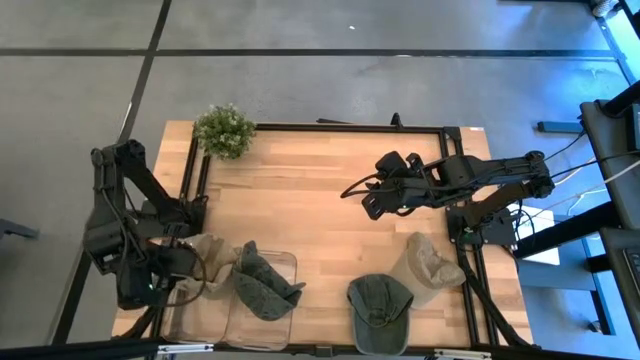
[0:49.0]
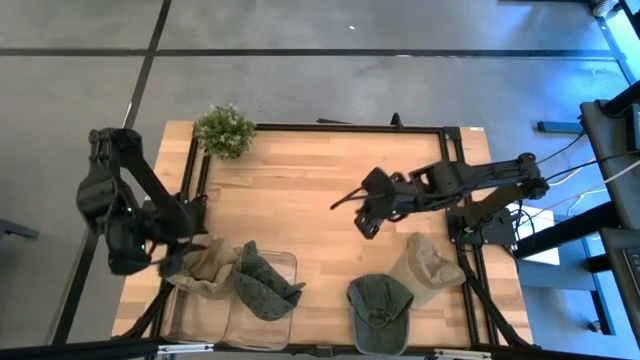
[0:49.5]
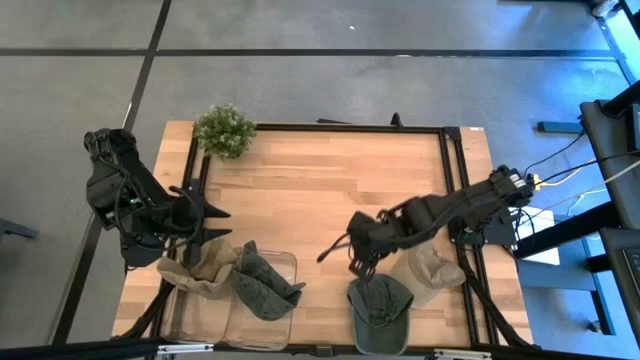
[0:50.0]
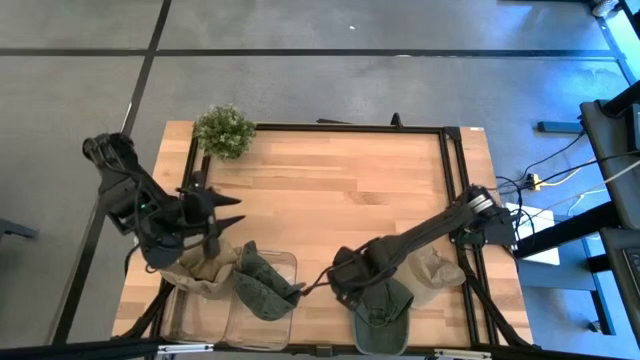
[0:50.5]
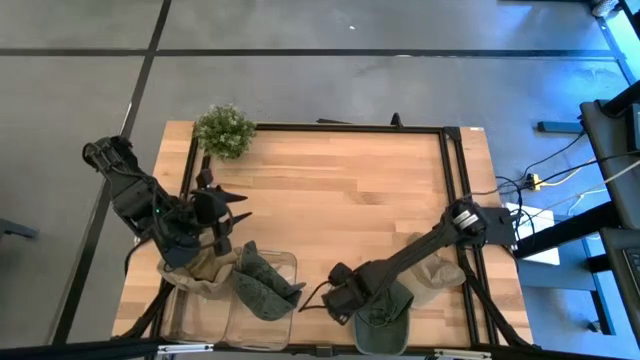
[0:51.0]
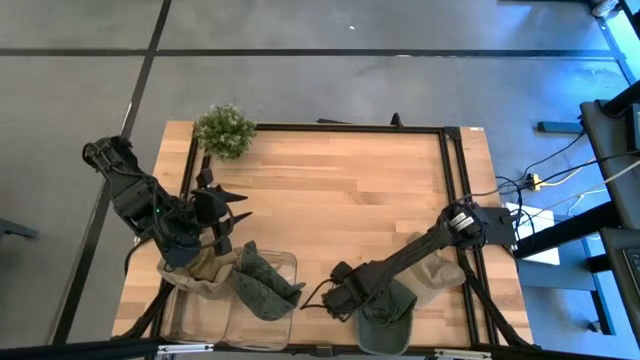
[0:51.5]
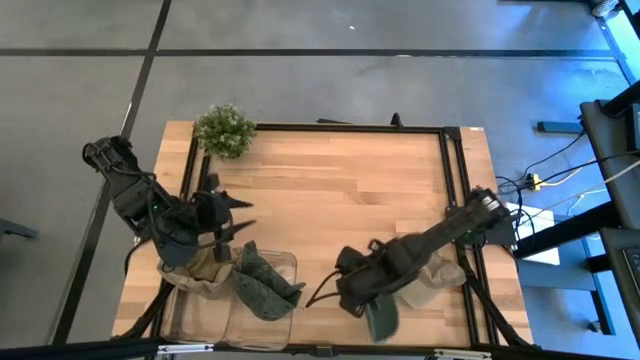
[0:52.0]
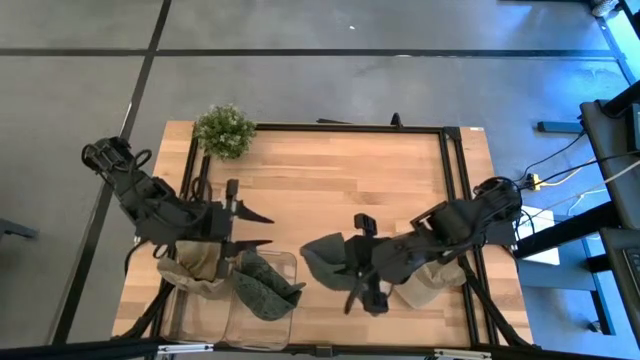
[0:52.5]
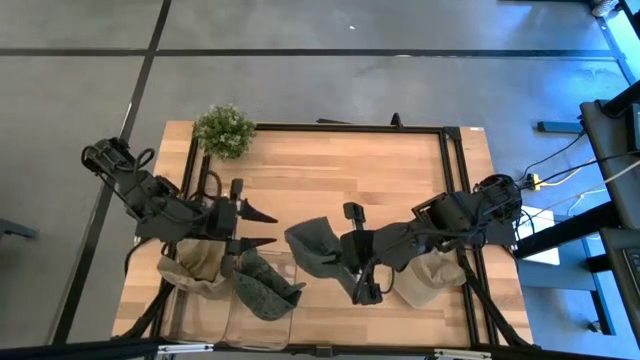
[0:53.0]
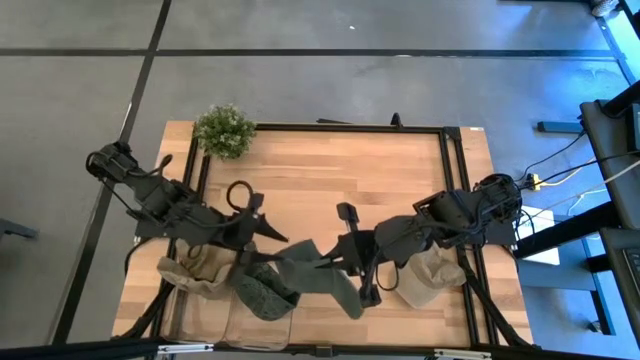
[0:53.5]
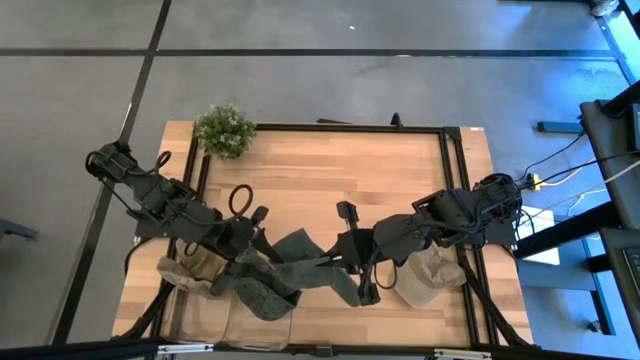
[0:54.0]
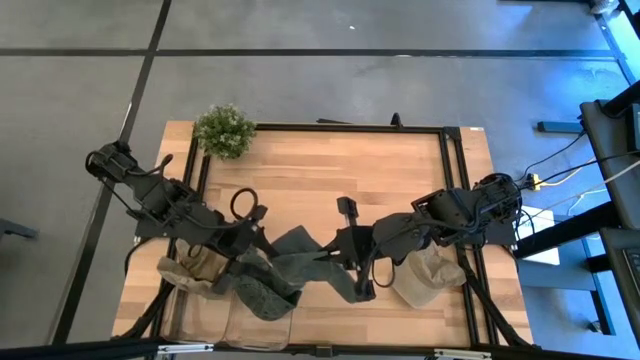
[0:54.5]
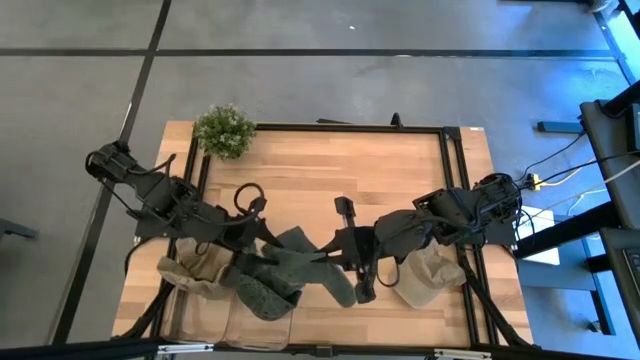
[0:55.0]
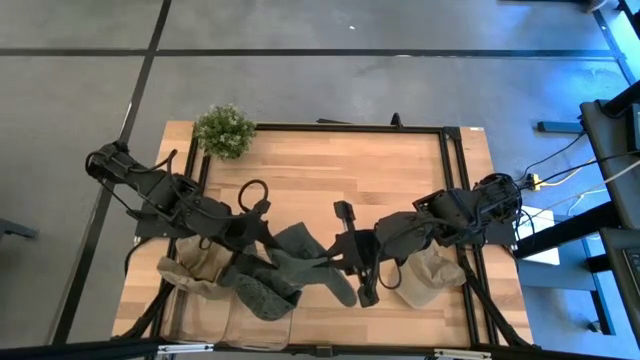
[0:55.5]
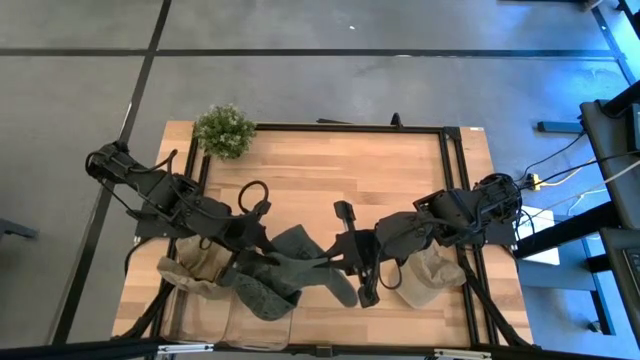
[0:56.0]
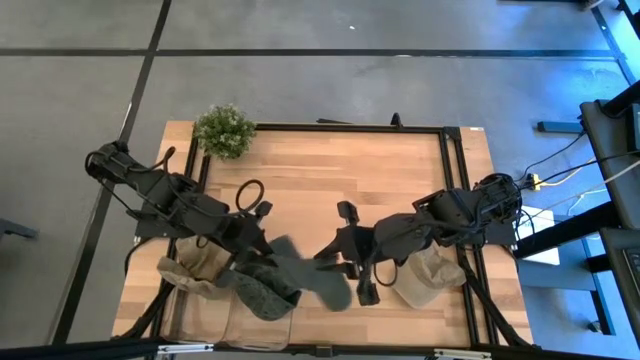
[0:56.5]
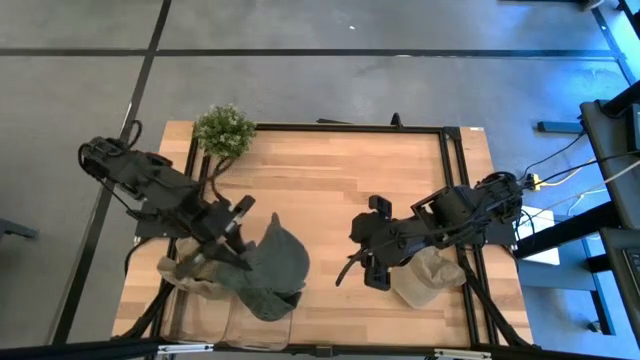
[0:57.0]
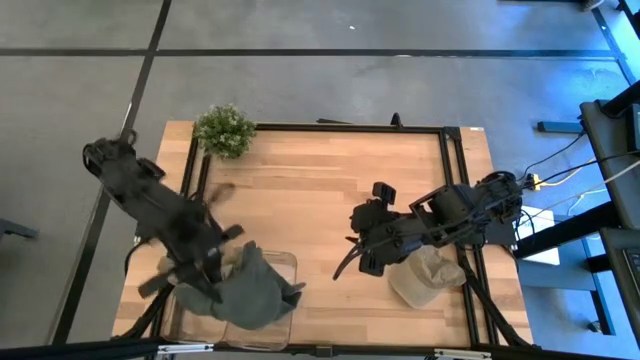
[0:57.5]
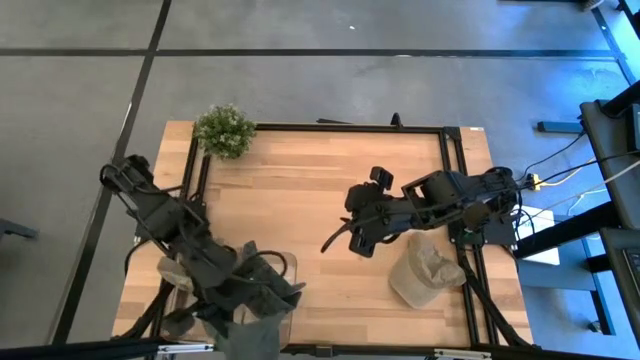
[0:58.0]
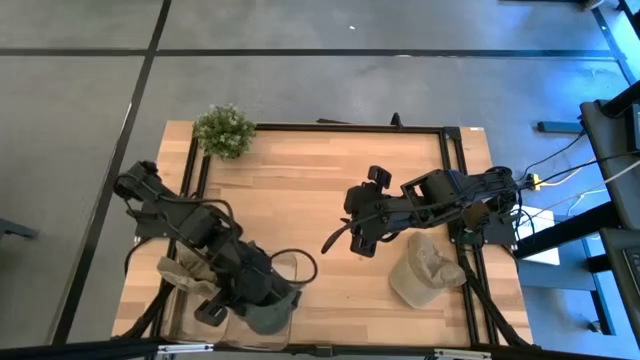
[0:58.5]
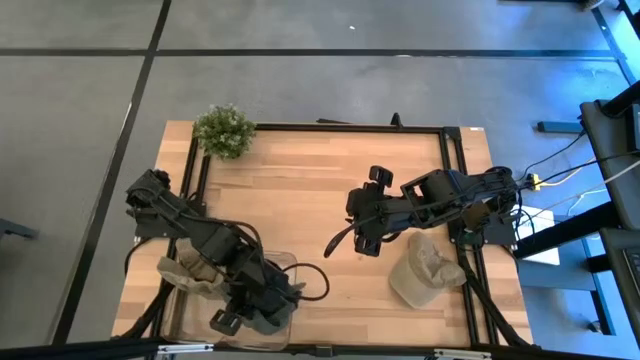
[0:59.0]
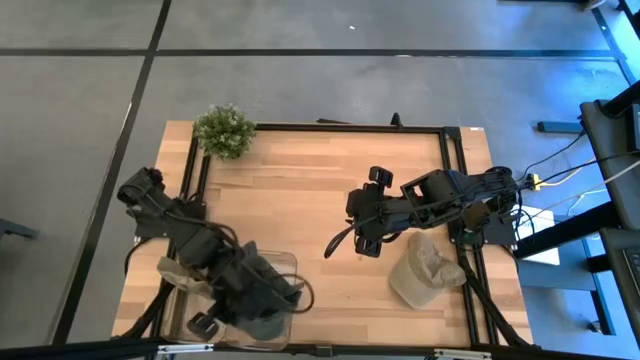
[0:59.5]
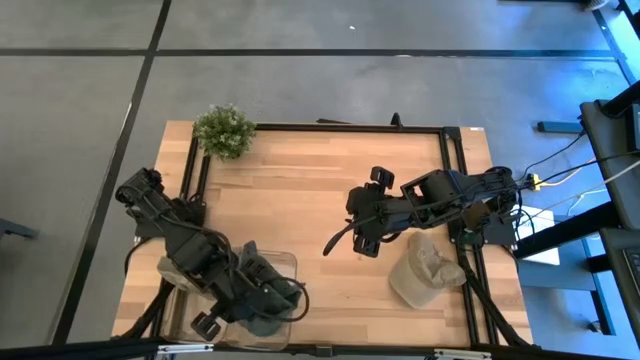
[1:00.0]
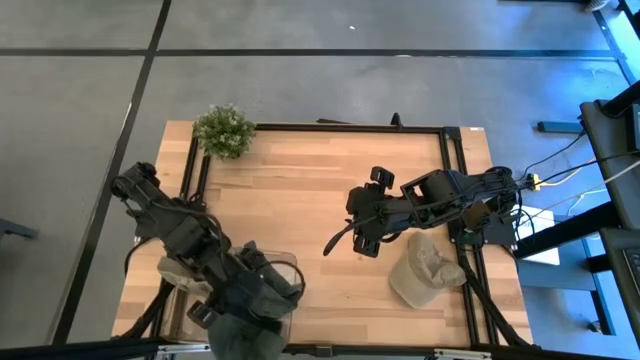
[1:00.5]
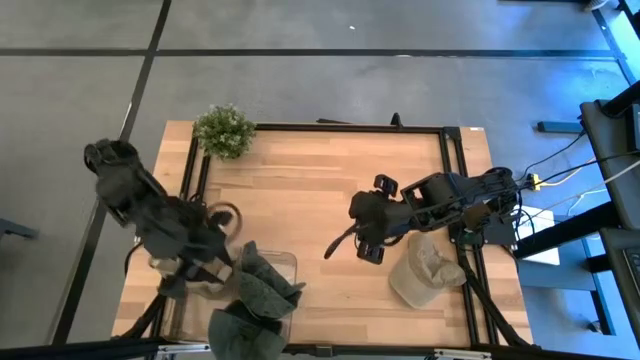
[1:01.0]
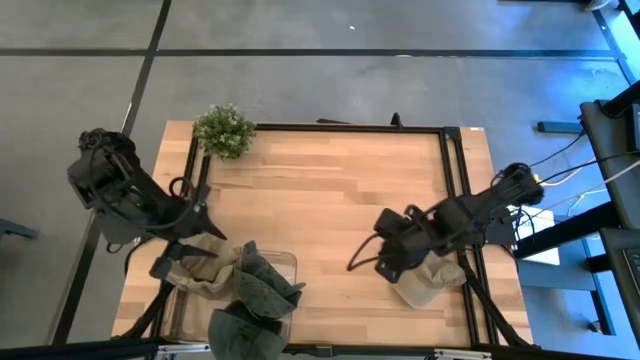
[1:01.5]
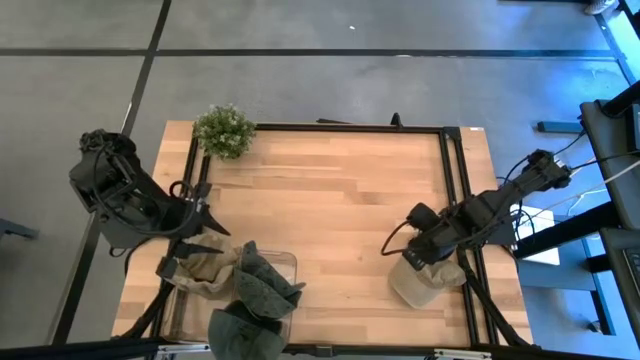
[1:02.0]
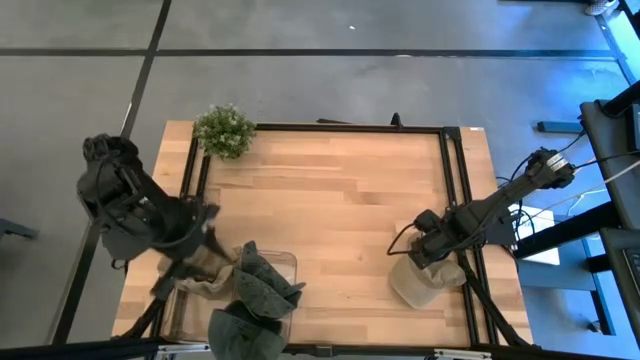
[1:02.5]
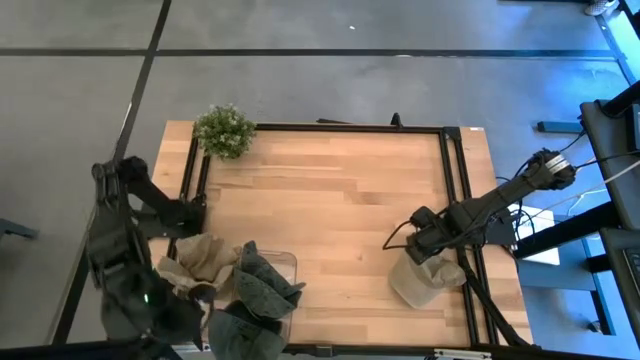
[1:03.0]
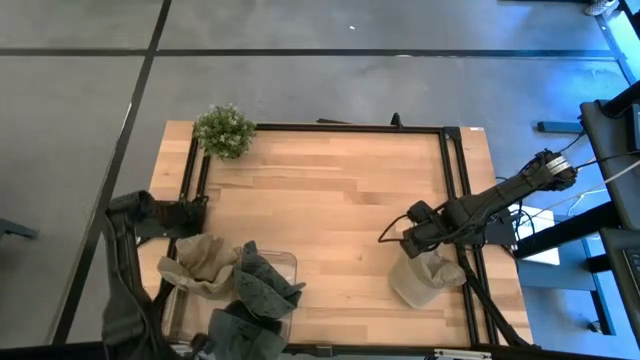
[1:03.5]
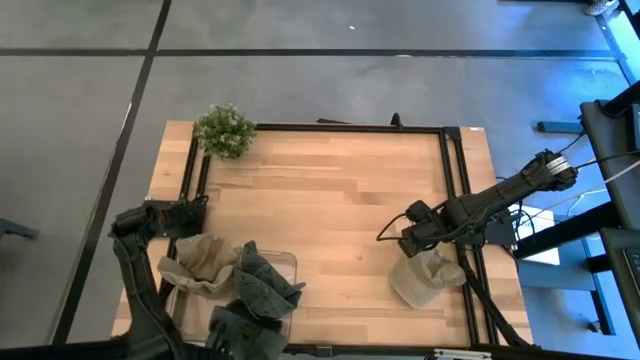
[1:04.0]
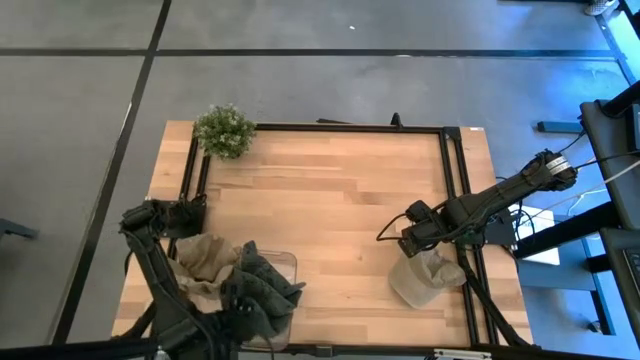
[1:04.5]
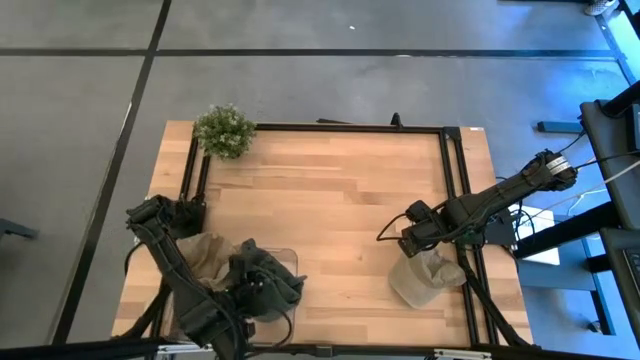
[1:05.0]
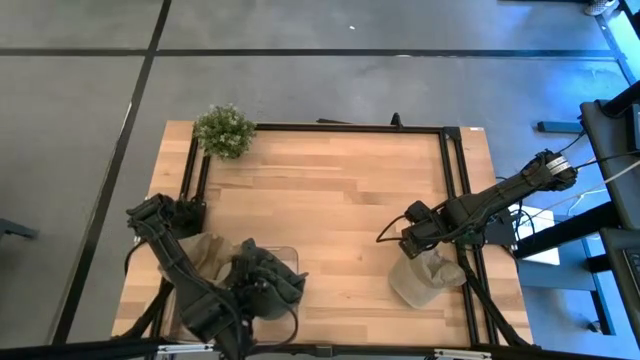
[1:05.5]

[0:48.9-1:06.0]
Task: Pick & Place hat
Put the black cap into the right transparent bin

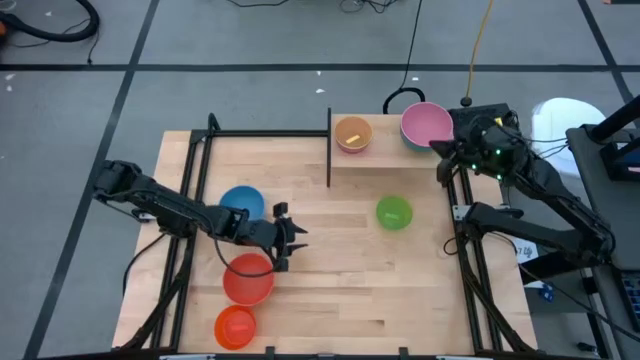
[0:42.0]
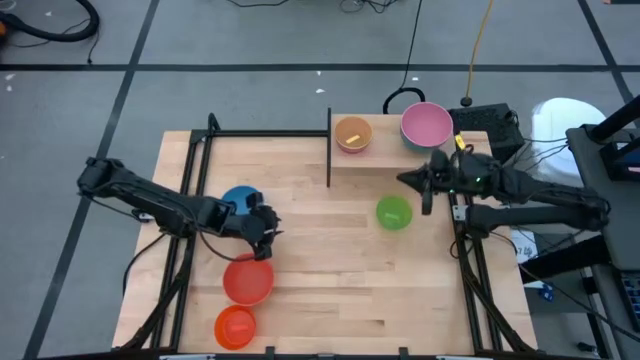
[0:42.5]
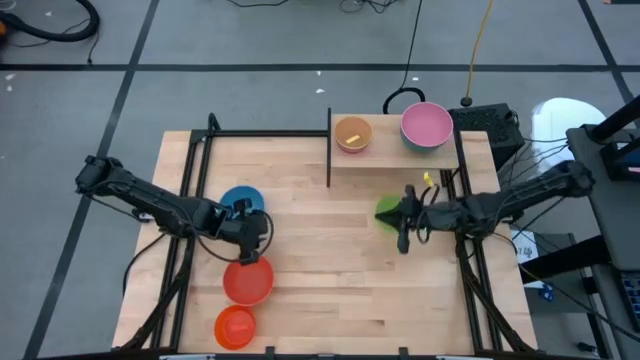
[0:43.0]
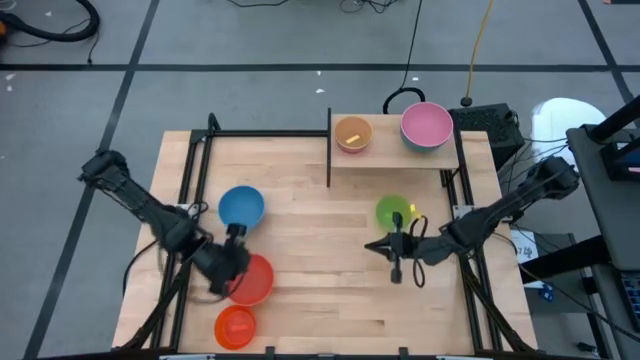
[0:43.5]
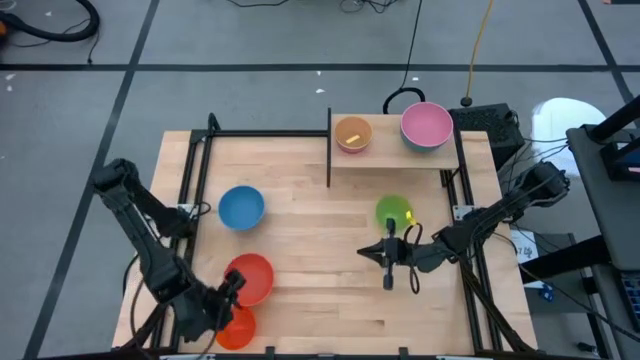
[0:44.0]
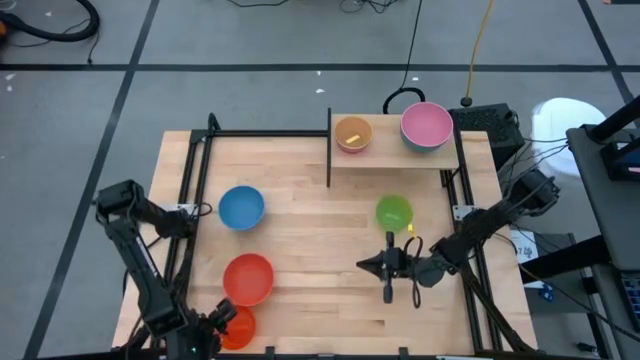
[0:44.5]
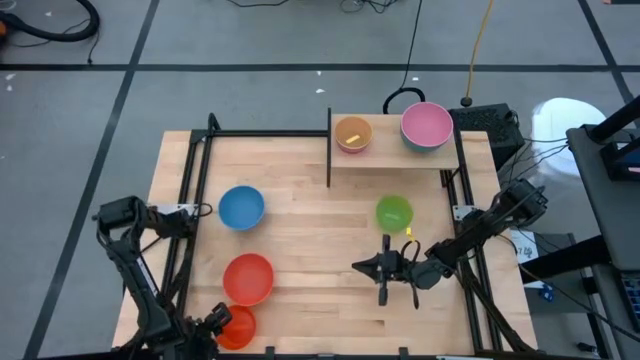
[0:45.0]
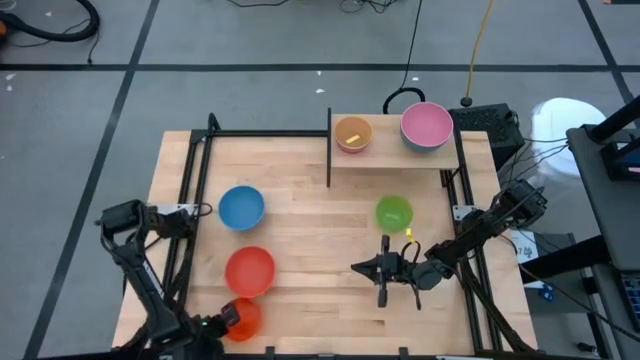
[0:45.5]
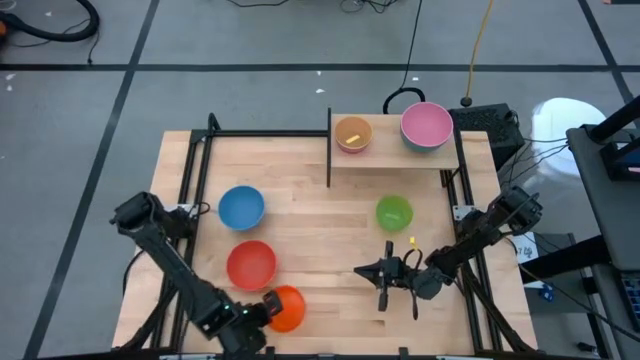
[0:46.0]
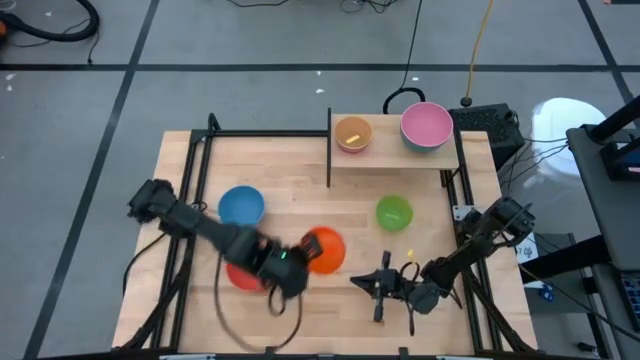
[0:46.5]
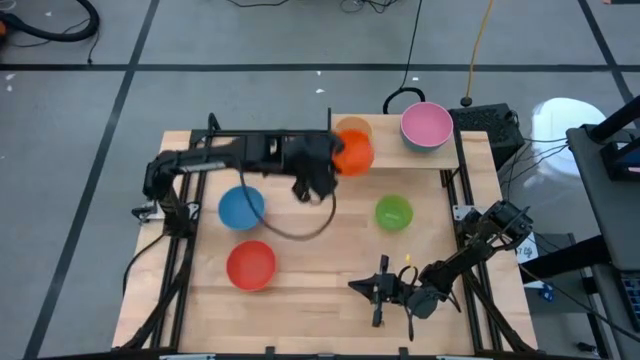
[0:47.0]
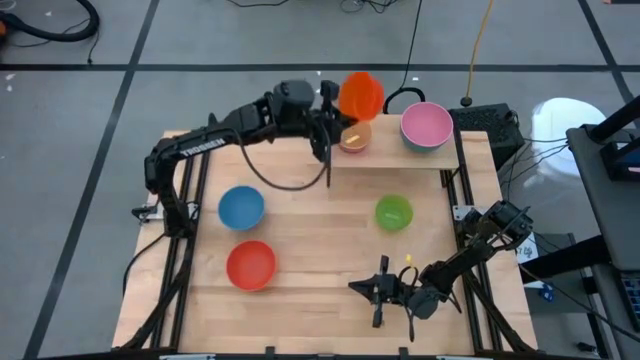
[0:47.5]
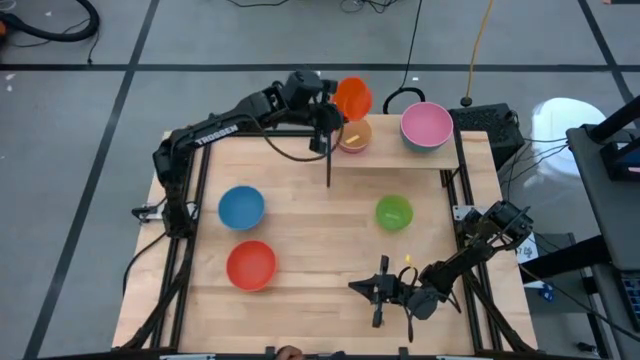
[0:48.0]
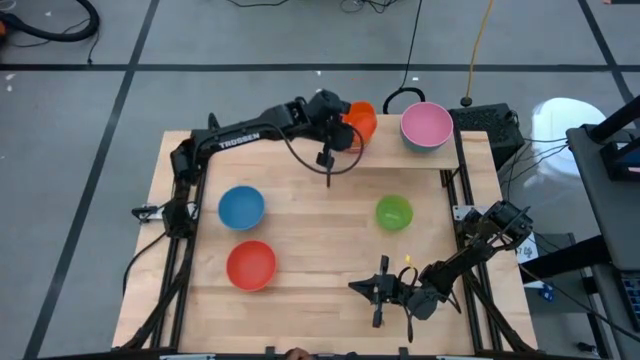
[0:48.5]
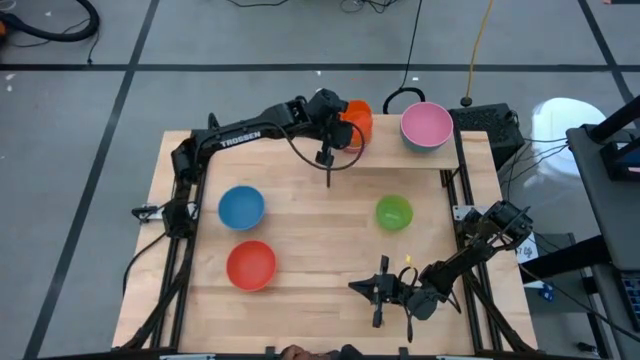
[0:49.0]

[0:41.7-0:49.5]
Task: Place and stack bowls onto a shelf
Stack the small orange bowl on top of the small yellow bowl on the shelf
